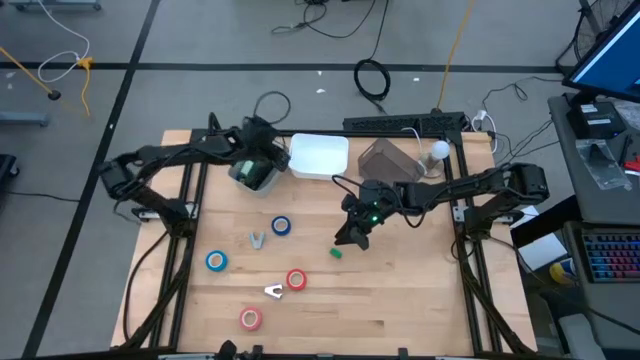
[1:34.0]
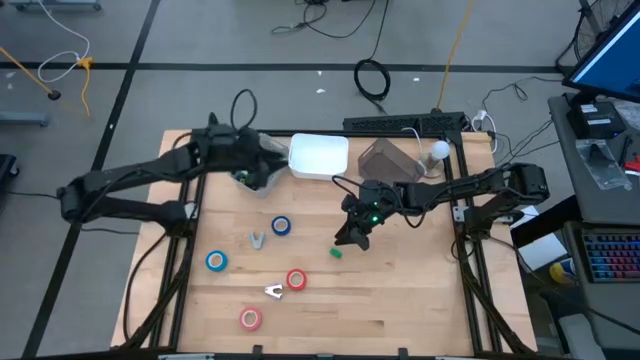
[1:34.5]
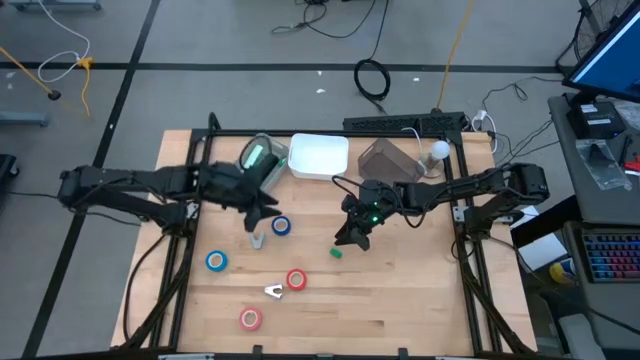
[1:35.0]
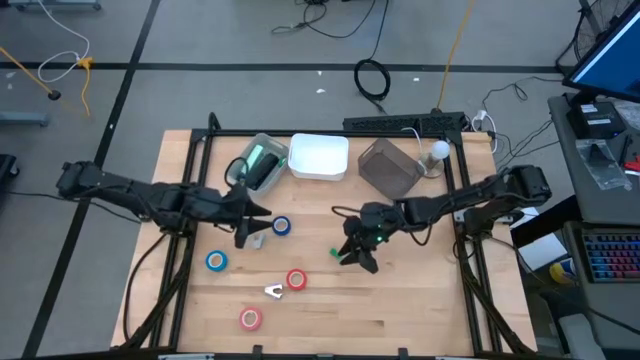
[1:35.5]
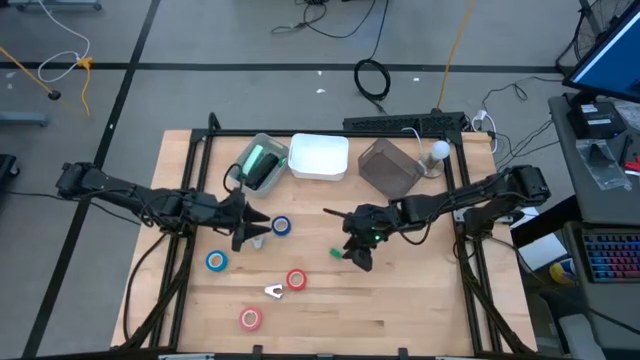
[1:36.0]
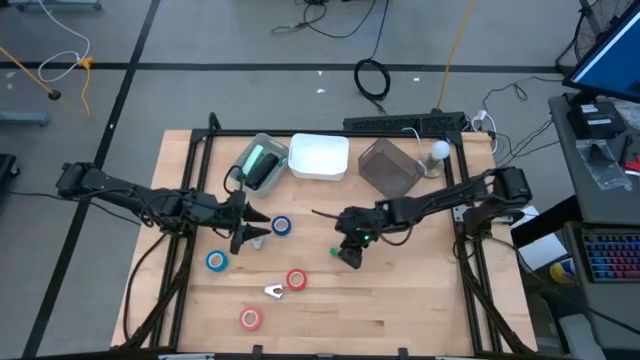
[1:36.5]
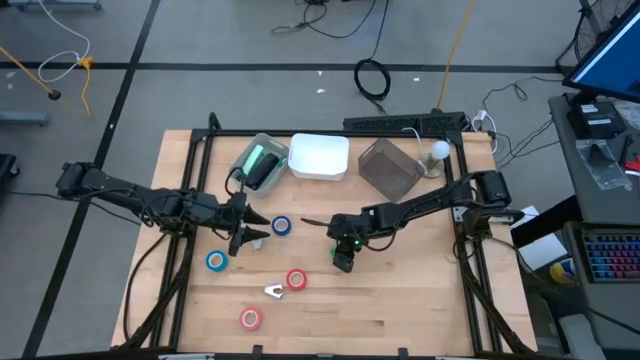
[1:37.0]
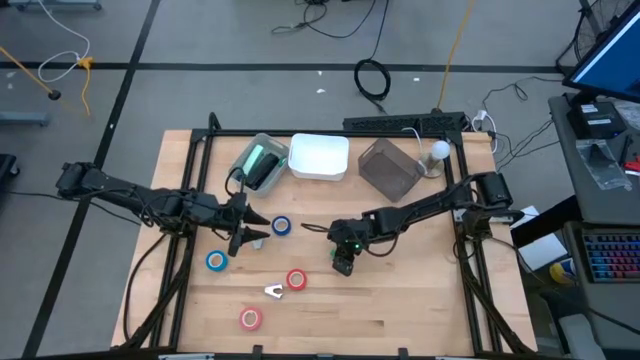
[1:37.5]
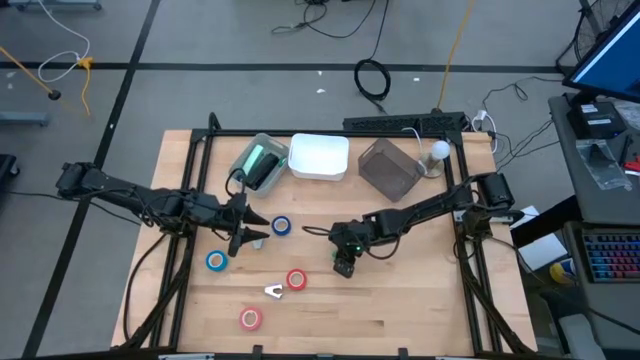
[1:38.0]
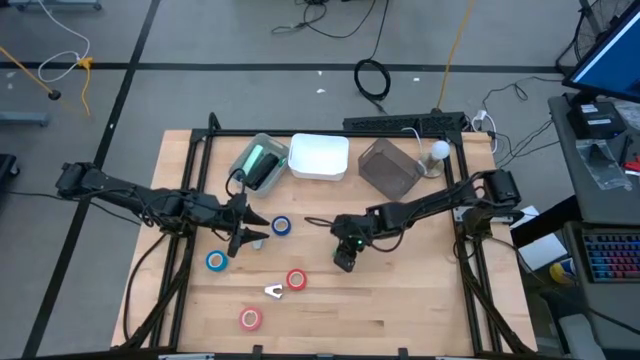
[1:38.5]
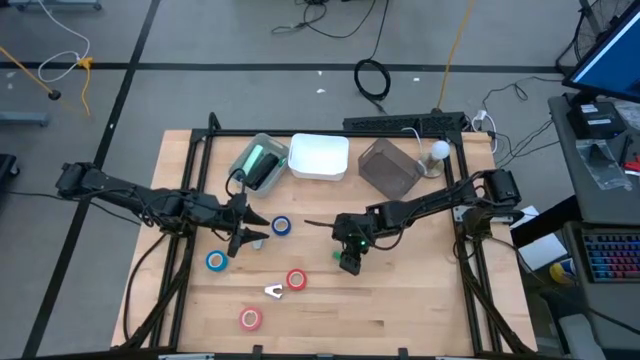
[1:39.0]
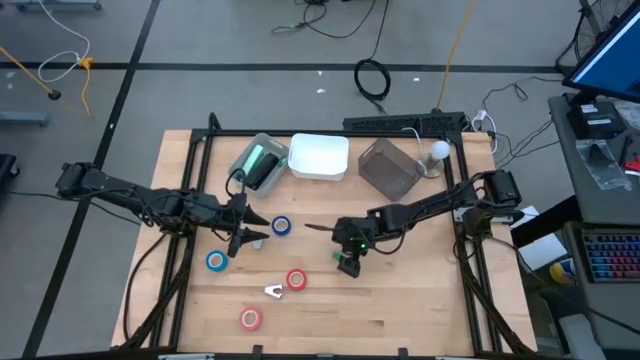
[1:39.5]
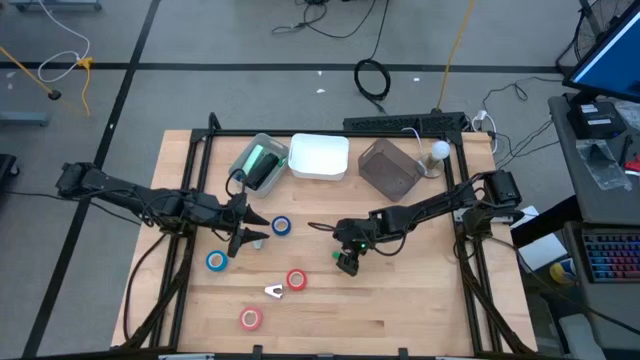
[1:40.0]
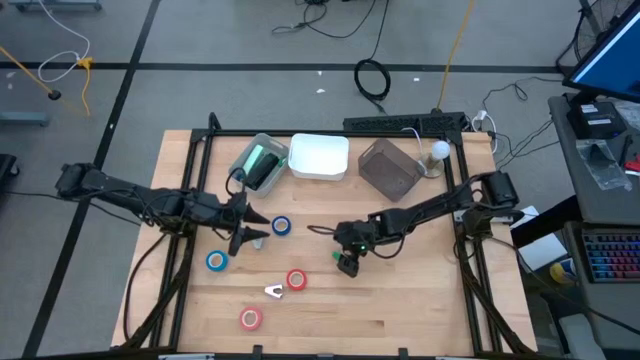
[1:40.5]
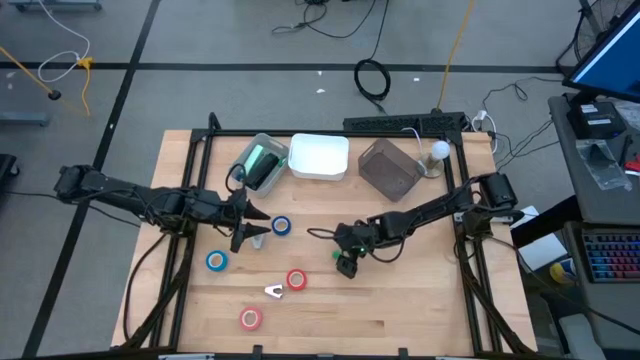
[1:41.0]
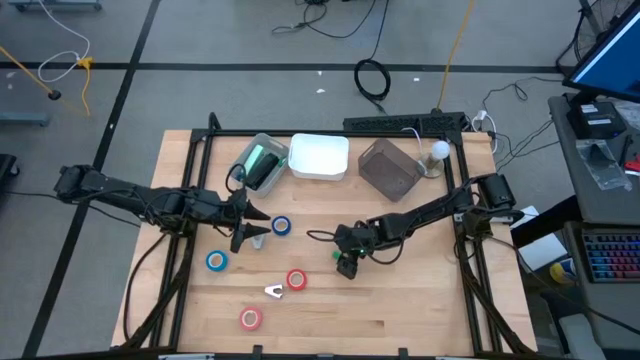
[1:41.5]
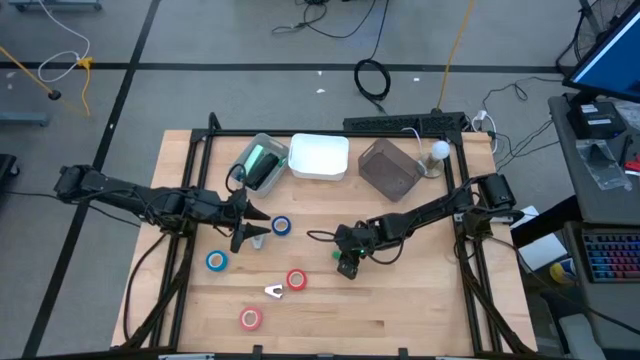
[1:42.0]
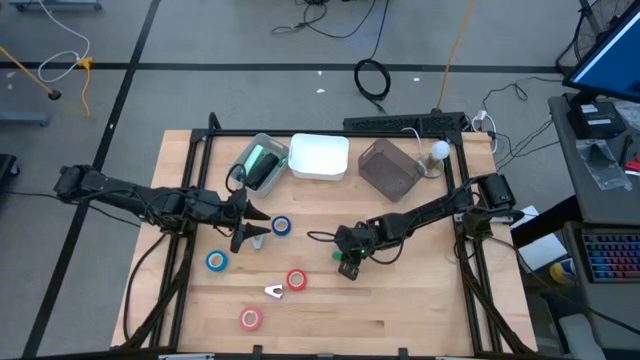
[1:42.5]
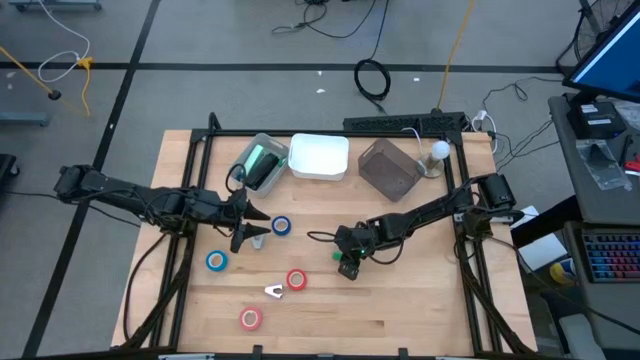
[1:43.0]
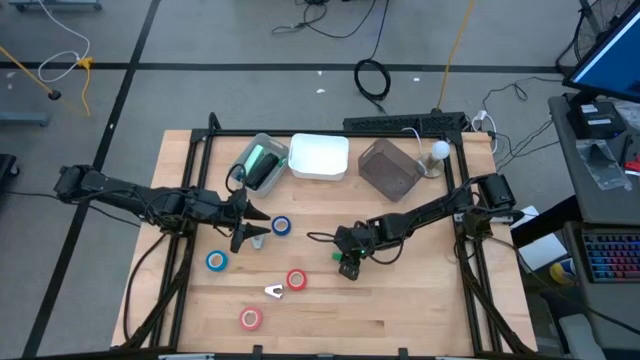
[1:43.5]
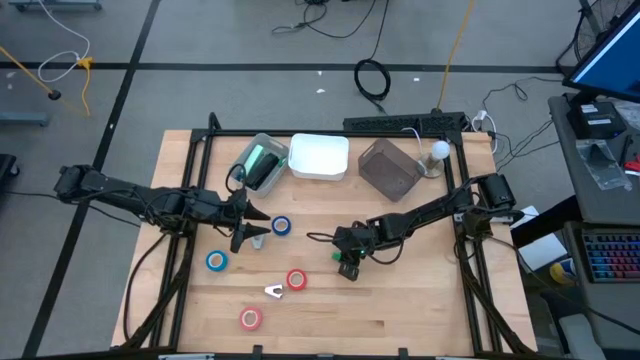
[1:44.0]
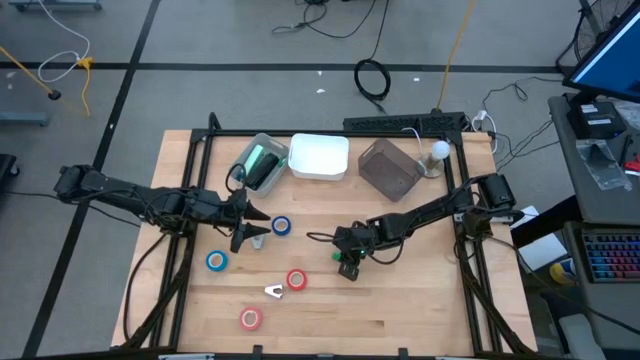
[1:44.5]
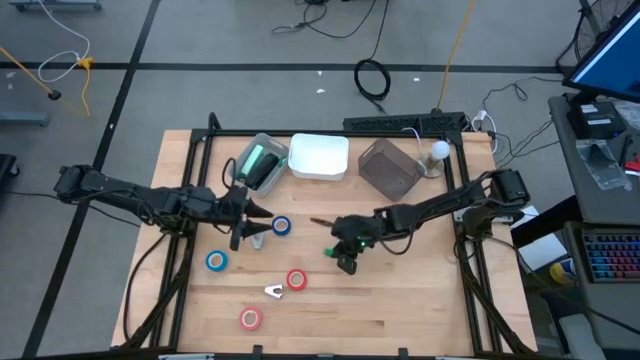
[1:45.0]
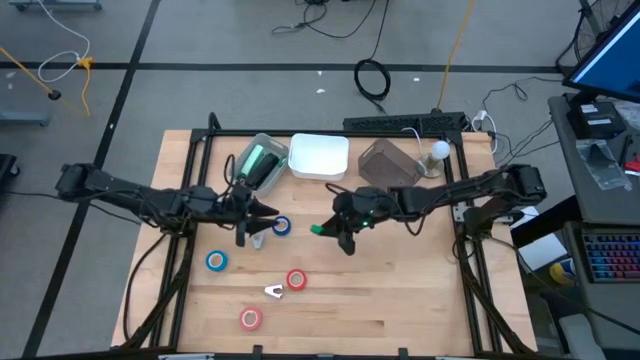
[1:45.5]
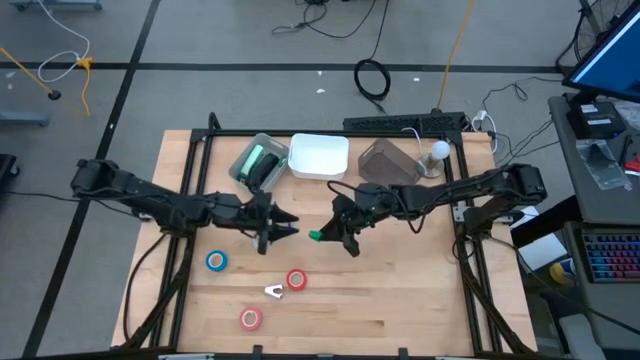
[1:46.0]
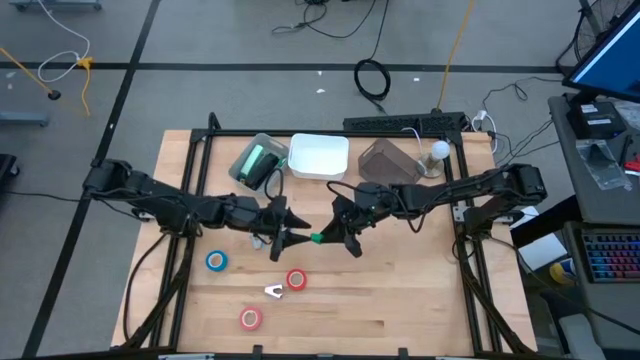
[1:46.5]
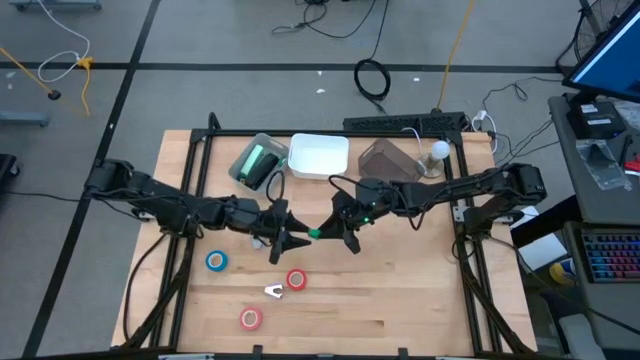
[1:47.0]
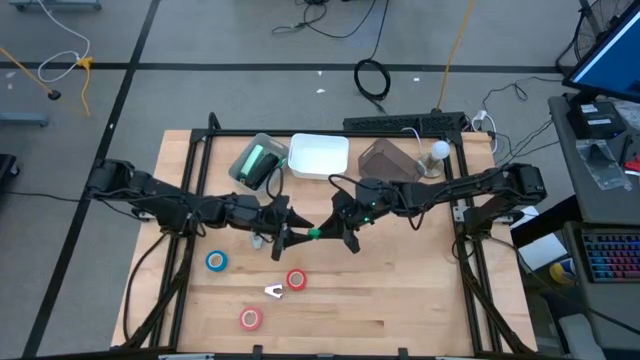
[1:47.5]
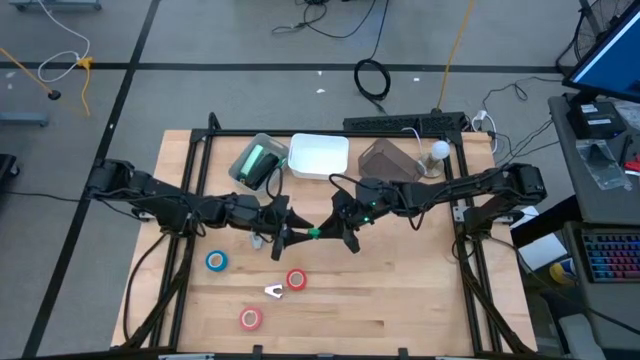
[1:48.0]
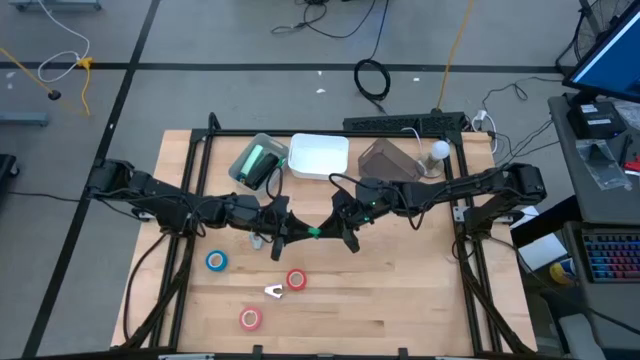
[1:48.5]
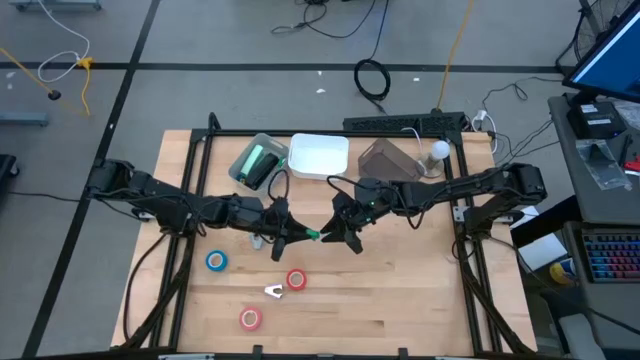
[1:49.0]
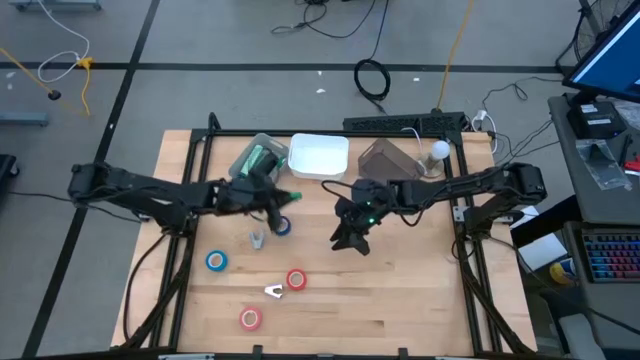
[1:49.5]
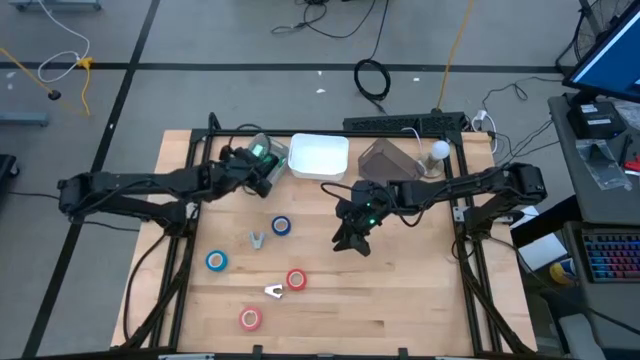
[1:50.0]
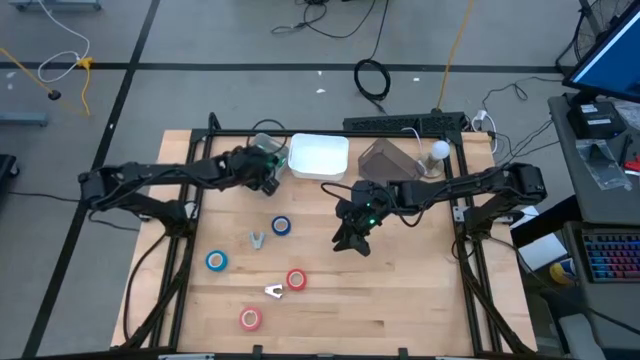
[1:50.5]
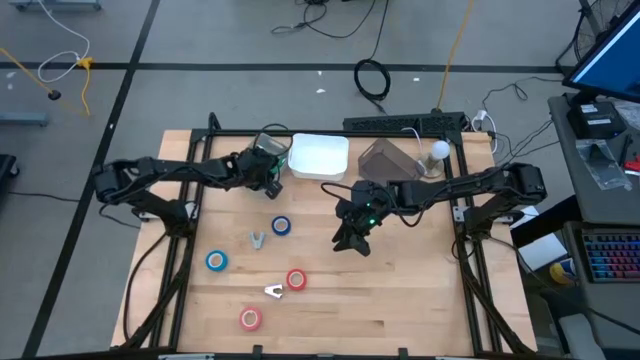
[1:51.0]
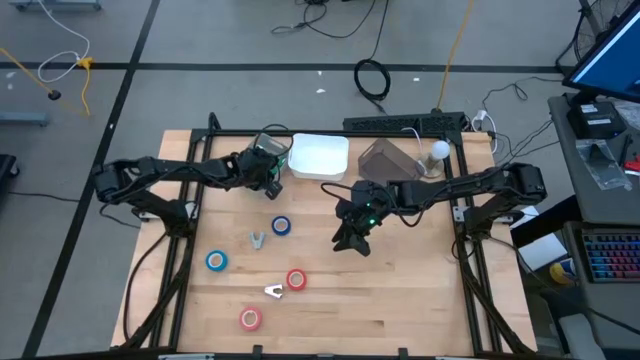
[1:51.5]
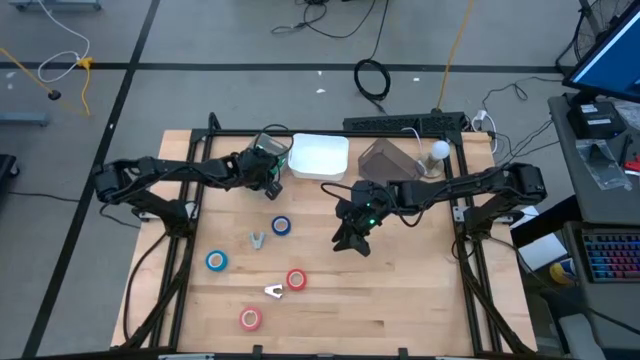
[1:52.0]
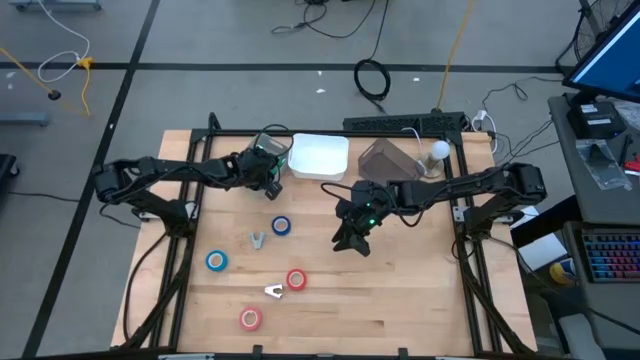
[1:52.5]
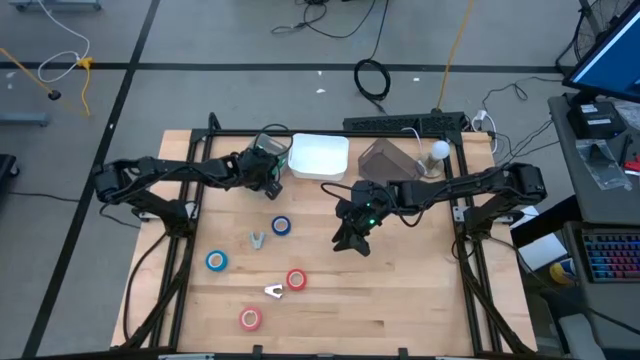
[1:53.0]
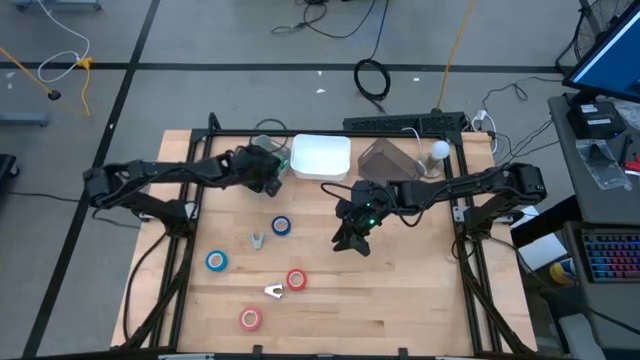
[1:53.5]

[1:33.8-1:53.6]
Task: Pick and place Stapler, Stapler remover, tape
Put the green stapler into the gray bin

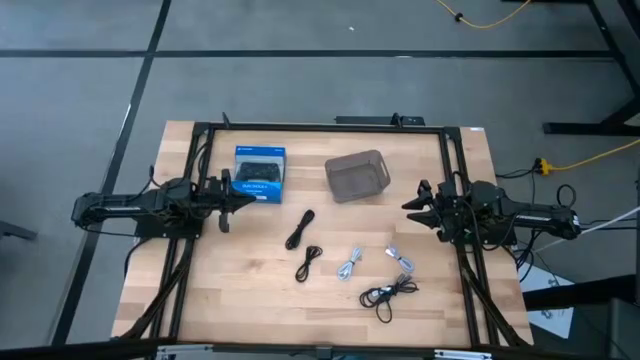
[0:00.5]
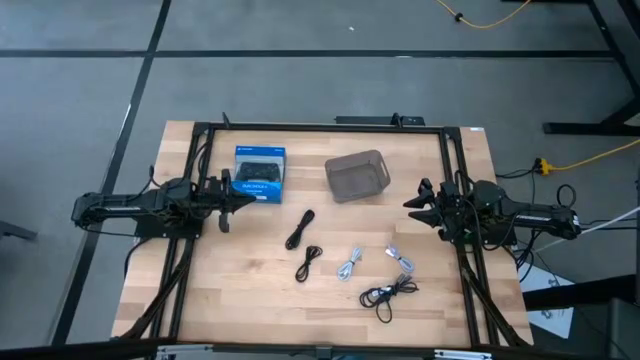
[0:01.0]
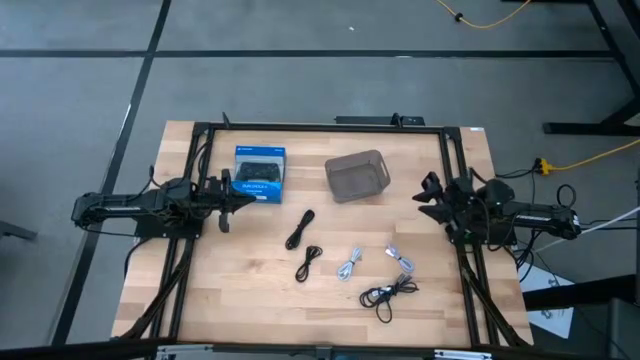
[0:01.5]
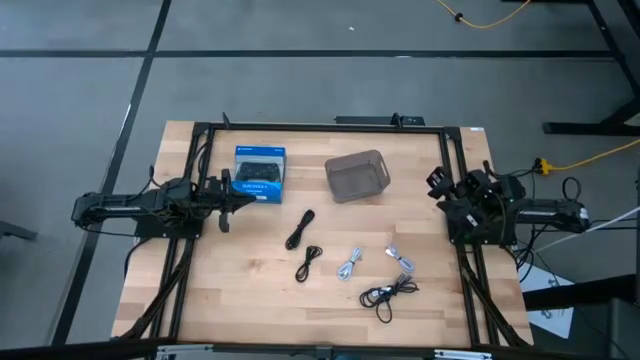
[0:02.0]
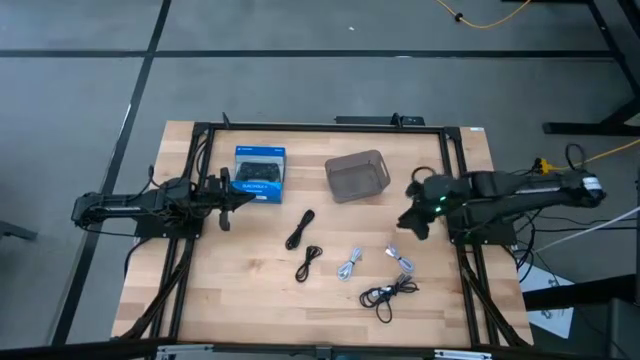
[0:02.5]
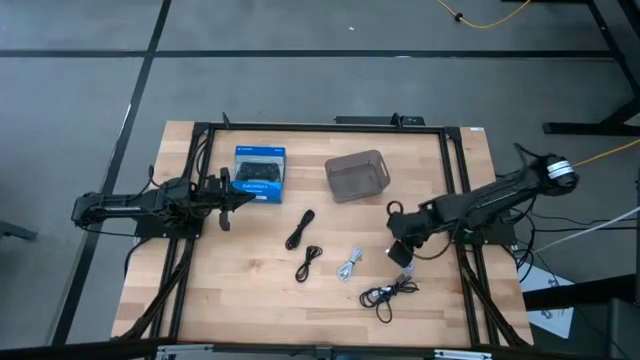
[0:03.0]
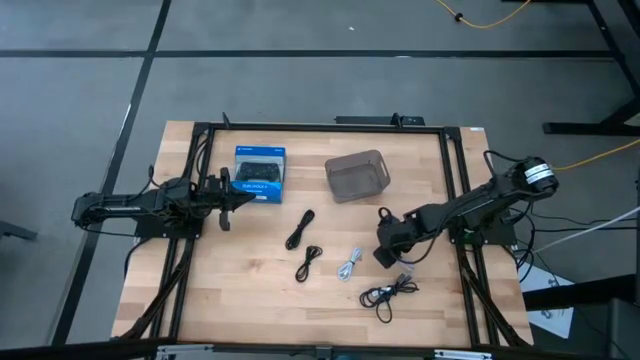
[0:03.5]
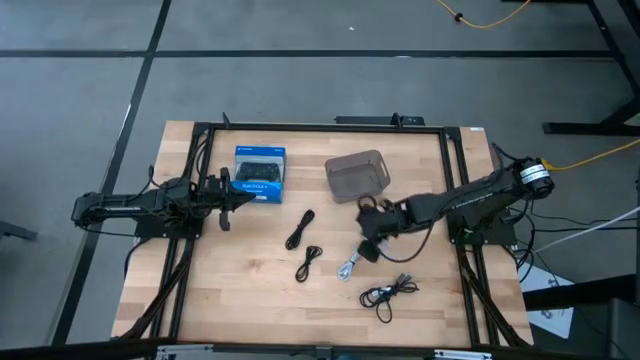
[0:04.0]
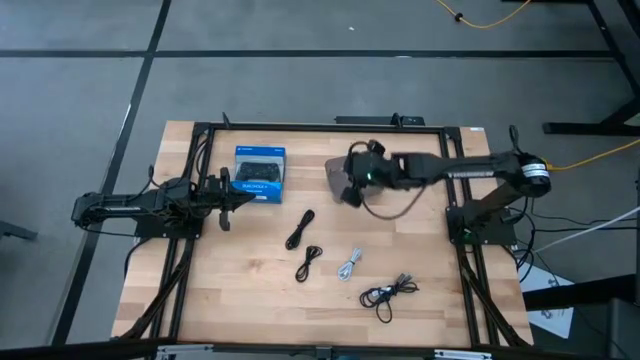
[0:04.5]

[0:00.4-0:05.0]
Task: Pick and place USB-C Cables
Put the right white charger cable into the black bin
